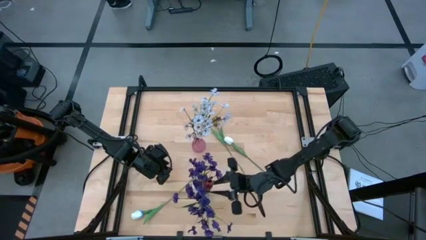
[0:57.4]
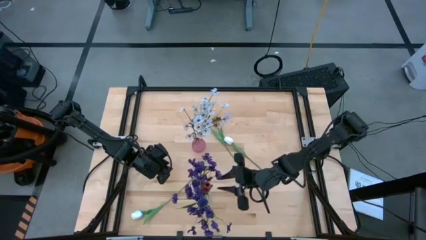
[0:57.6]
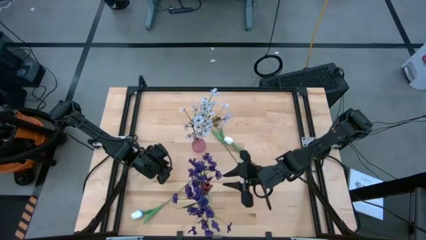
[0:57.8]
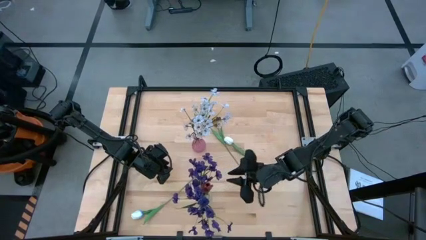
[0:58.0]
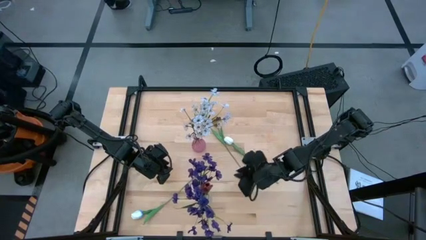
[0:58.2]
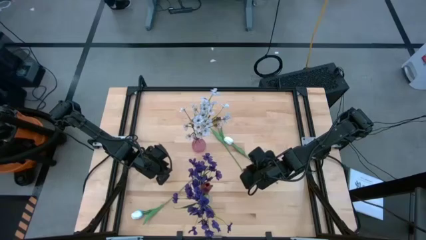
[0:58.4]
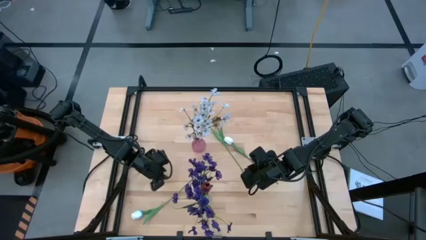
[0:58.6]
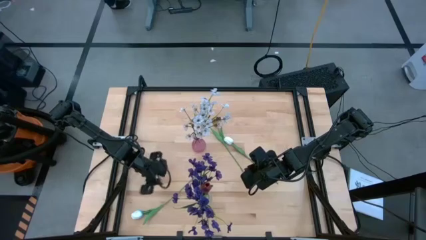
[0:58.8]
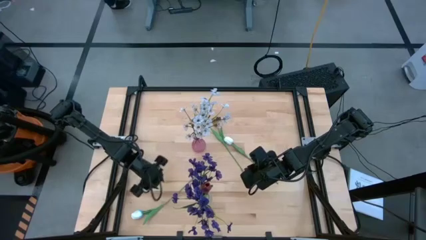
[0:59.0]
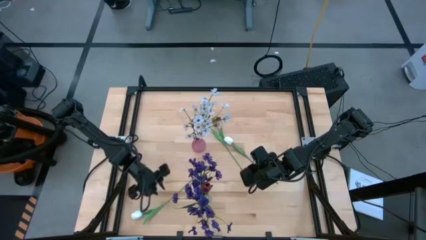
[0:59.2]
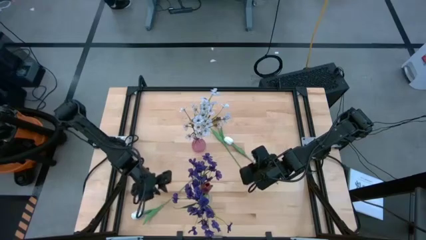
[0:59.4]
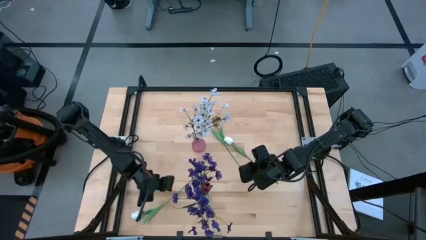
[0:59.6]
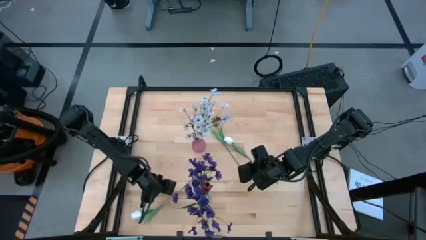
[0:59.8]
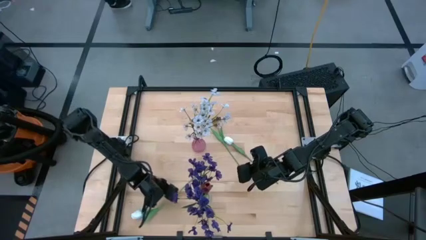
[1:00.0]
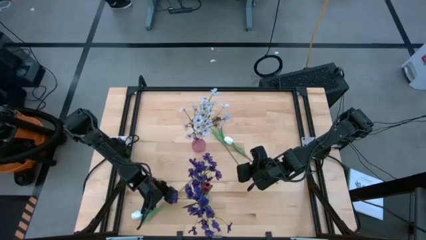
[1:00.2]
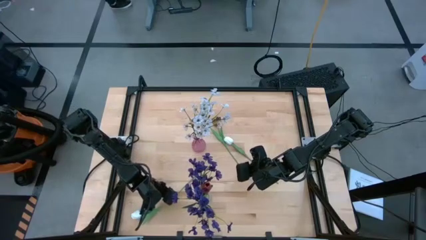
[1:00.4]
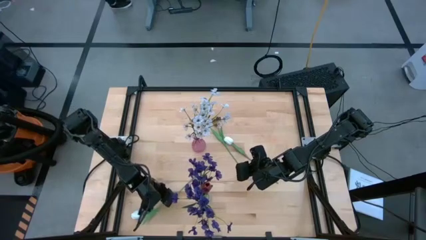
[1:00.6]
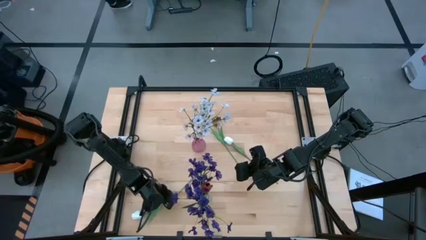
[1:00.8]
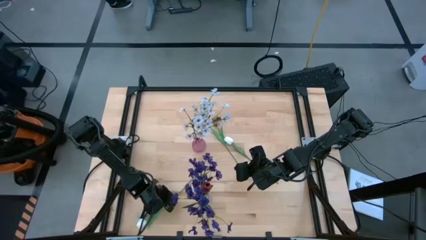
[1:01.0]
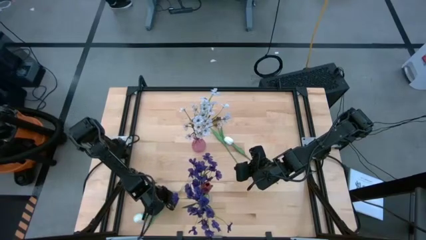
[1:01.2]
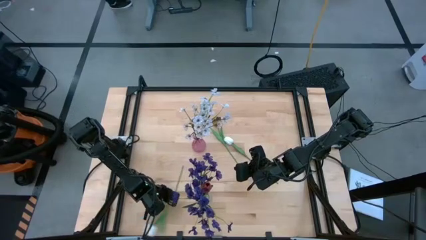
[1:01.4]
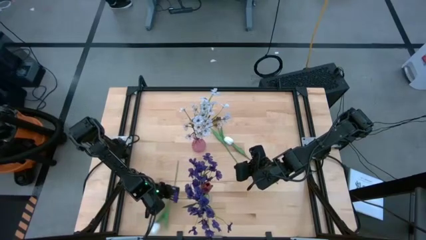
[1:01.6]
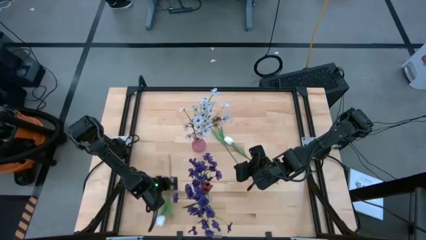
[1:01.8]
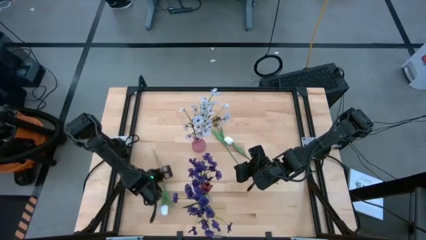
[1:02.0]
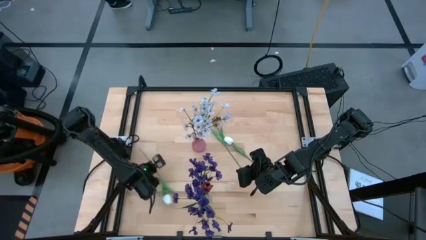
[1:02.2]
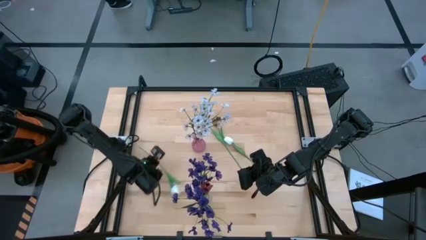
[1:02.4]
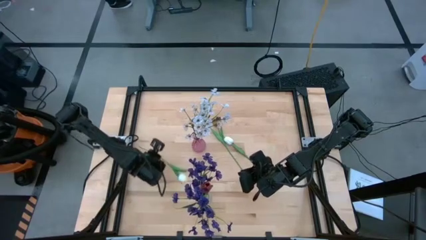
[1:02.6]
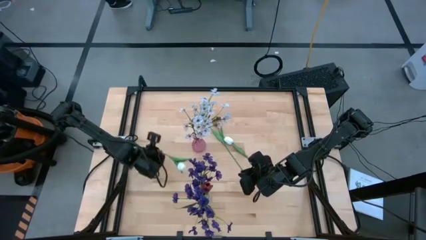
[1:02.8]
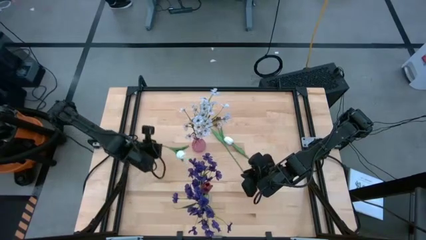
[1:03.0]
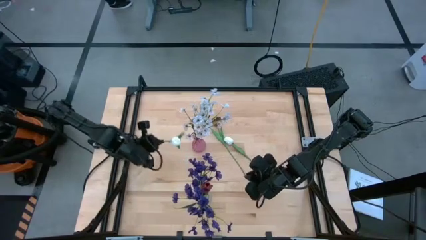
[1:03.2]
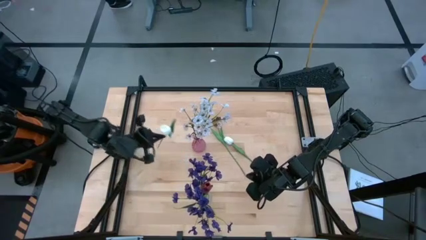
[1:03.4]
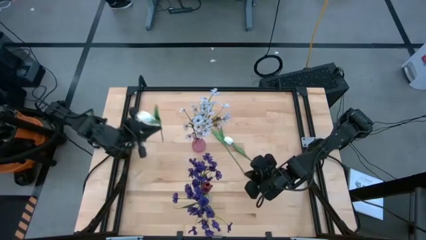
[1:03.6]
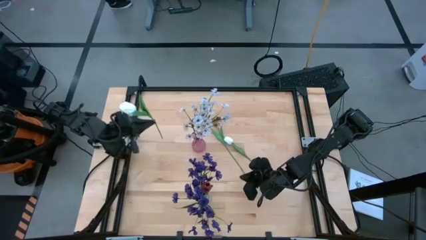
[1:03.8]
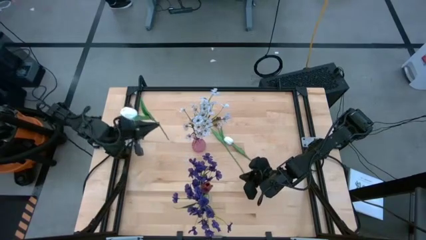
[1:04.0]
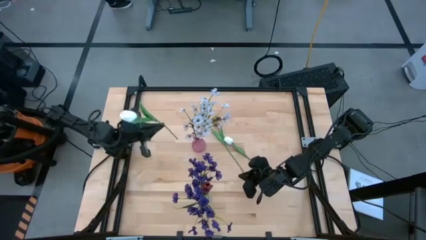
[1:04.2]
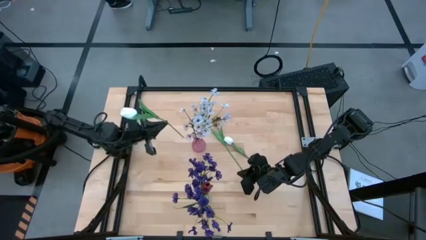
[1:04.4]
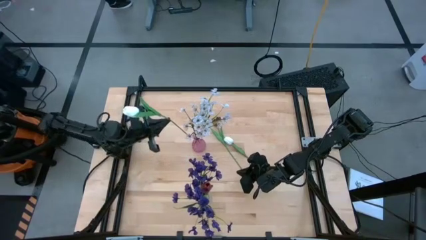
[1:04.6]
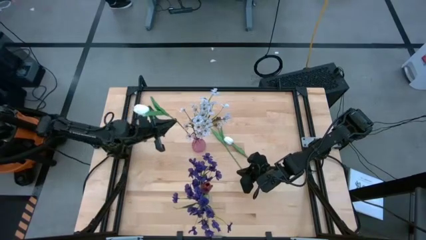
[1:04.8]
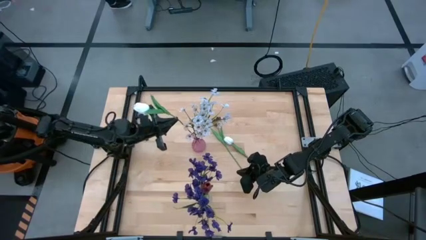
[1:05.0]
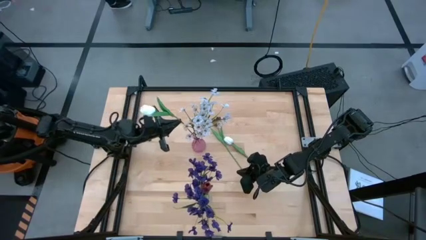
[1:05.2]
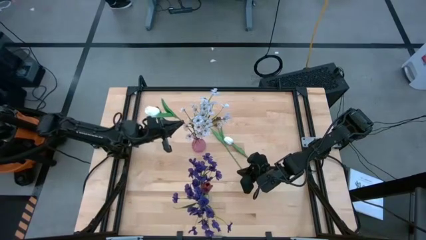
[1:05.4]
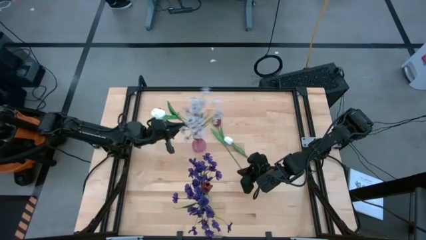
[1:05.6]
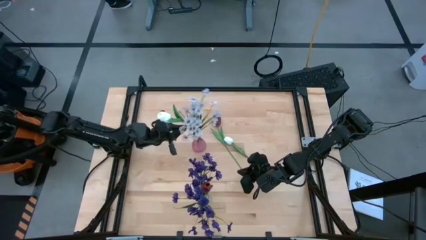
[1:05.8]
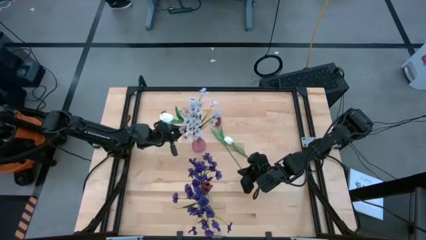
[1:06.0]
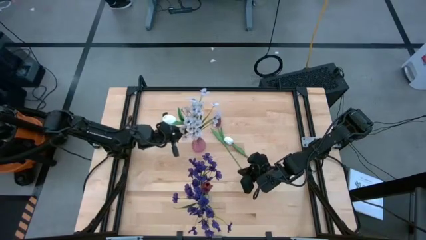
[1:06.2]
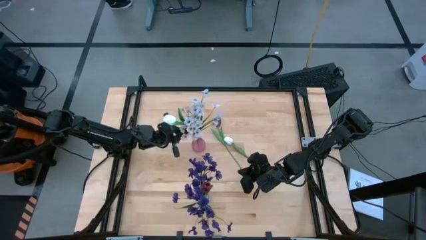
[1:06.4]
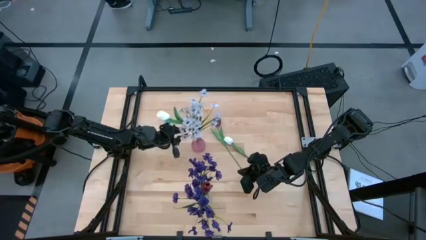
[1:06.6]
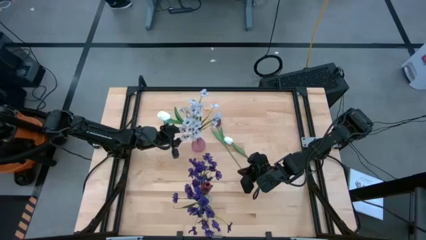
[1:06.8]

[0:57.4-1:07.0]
Task: Sort flowers into vase by color
Put the bottom white flower into the pink vase

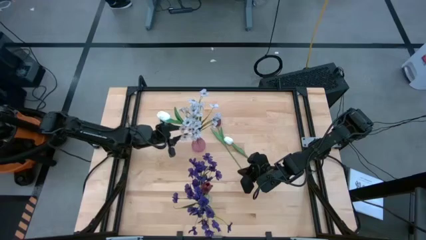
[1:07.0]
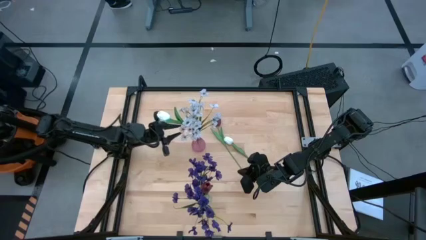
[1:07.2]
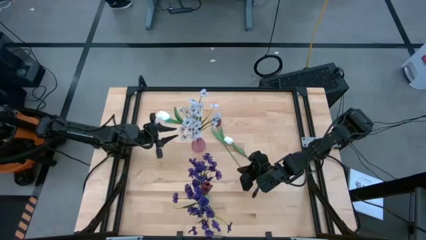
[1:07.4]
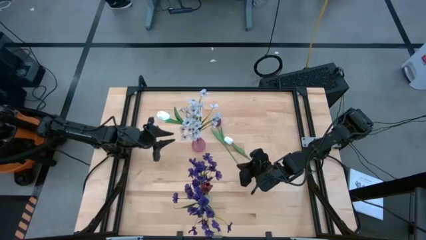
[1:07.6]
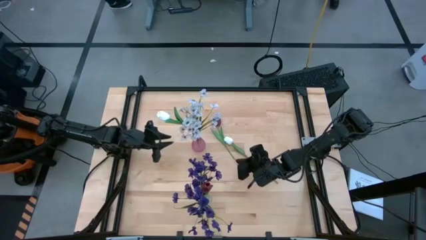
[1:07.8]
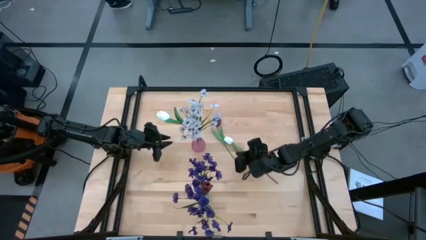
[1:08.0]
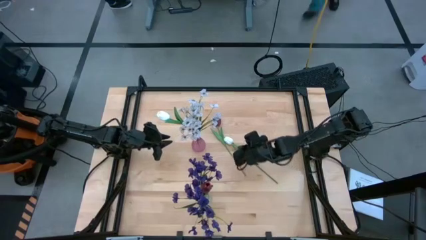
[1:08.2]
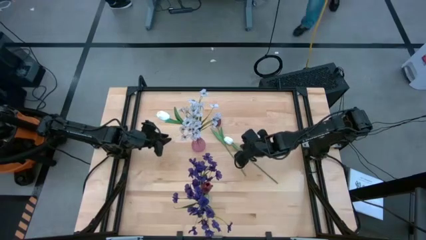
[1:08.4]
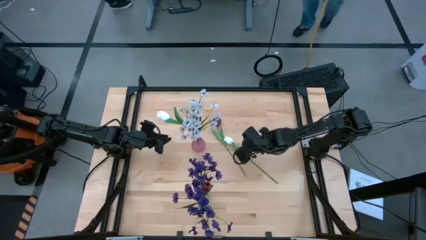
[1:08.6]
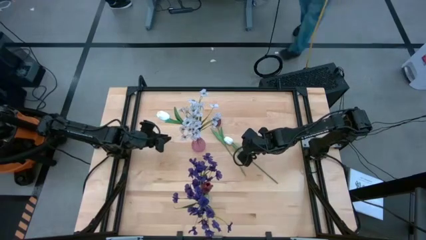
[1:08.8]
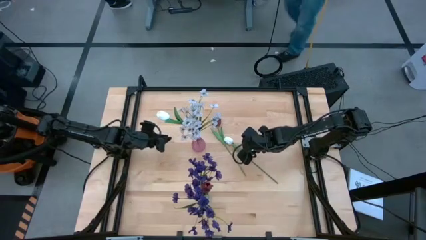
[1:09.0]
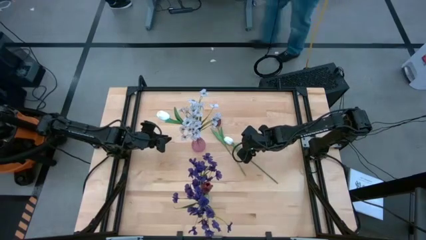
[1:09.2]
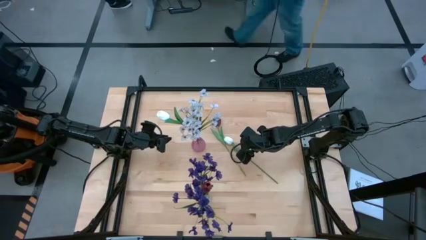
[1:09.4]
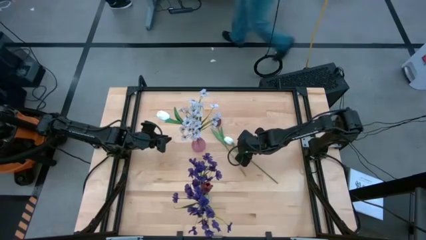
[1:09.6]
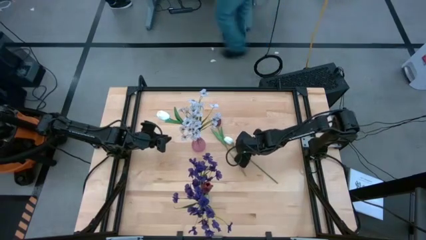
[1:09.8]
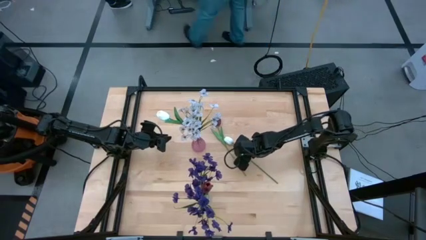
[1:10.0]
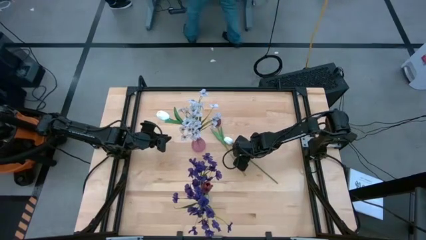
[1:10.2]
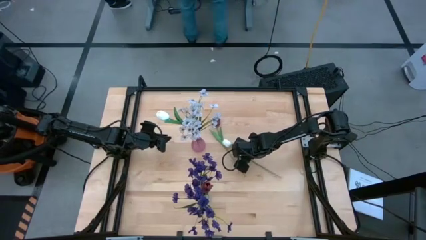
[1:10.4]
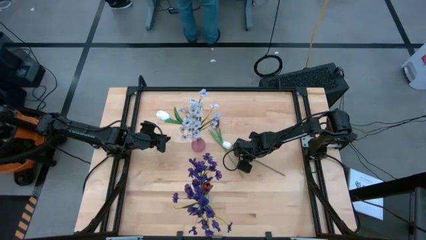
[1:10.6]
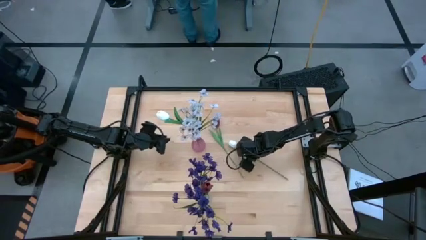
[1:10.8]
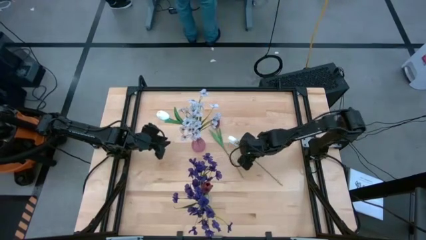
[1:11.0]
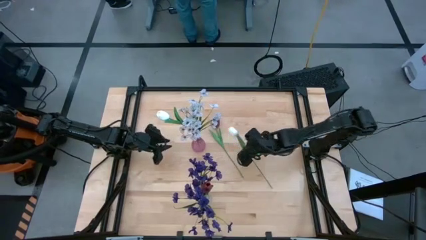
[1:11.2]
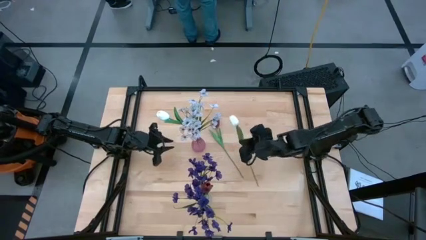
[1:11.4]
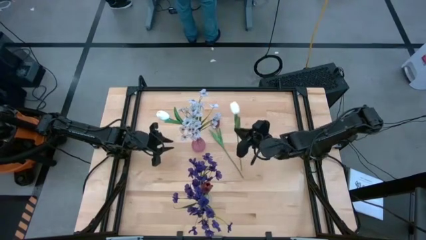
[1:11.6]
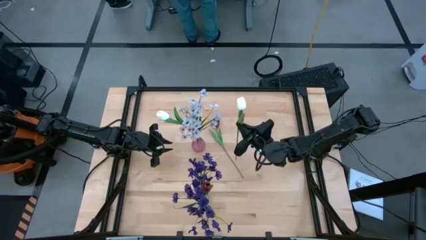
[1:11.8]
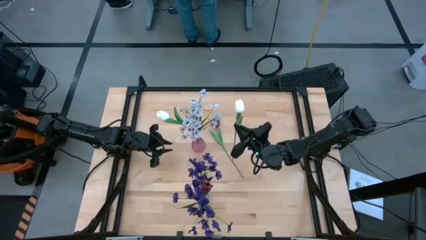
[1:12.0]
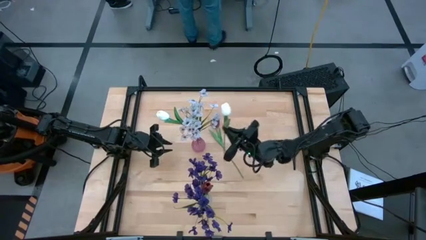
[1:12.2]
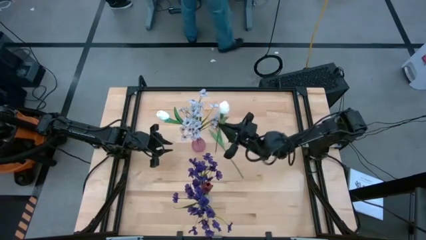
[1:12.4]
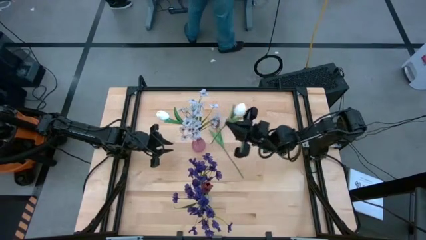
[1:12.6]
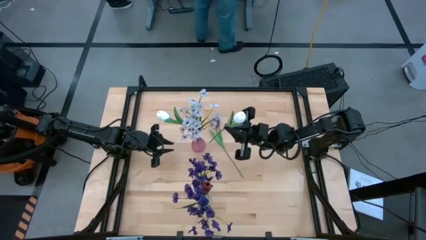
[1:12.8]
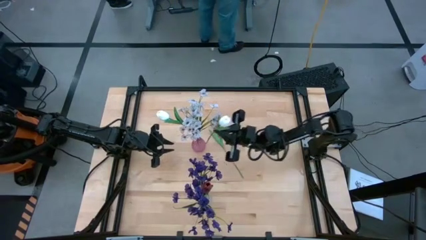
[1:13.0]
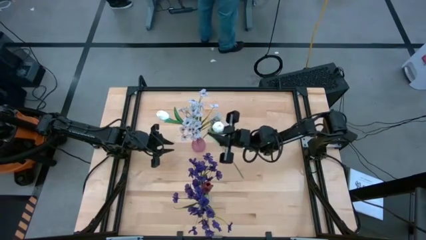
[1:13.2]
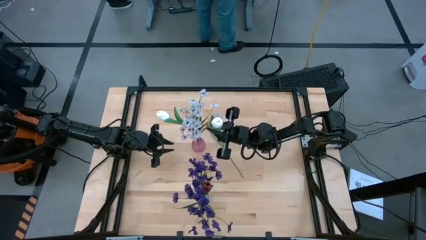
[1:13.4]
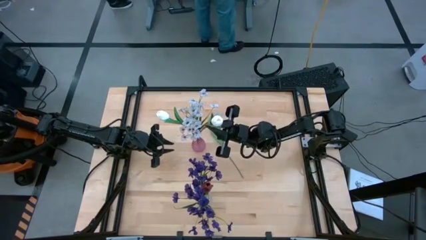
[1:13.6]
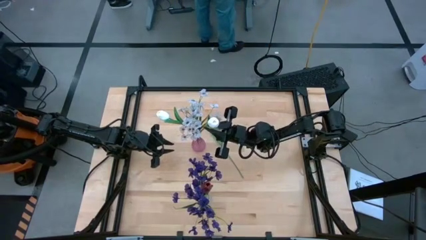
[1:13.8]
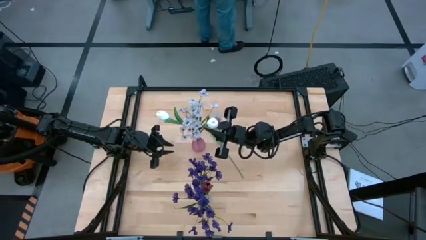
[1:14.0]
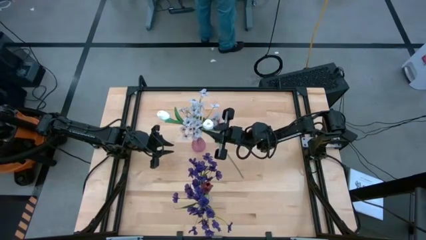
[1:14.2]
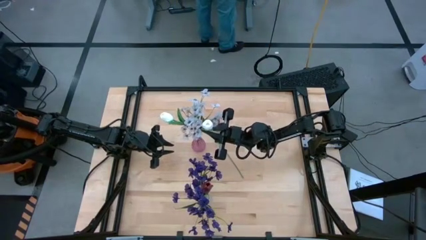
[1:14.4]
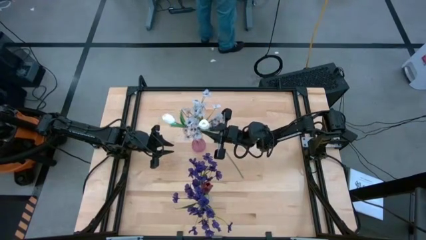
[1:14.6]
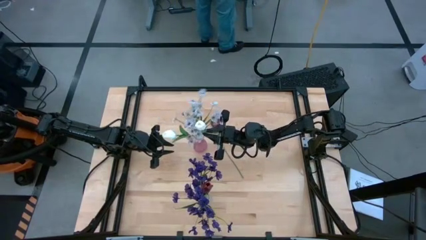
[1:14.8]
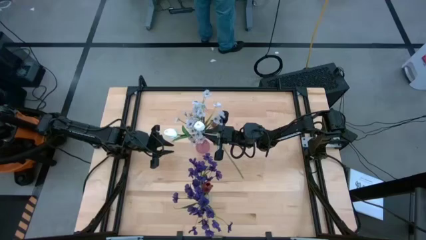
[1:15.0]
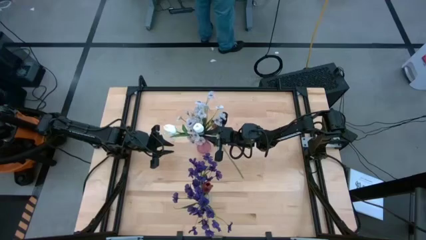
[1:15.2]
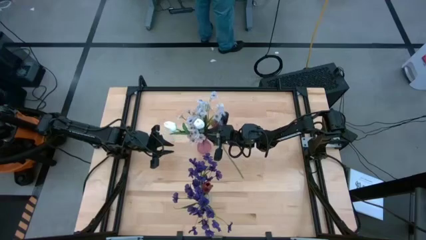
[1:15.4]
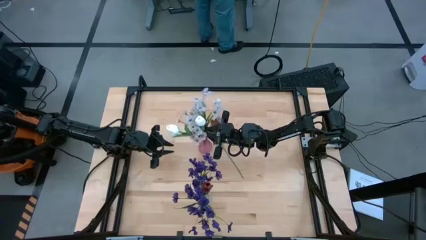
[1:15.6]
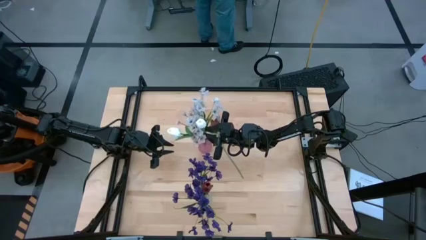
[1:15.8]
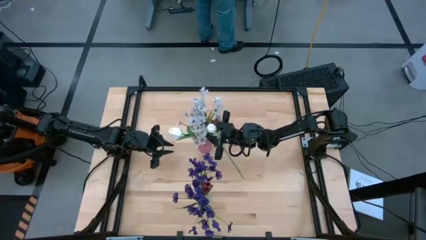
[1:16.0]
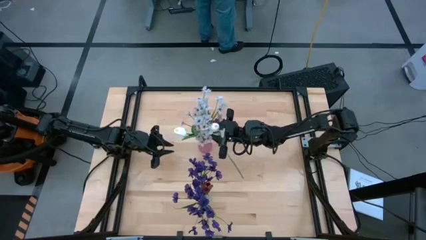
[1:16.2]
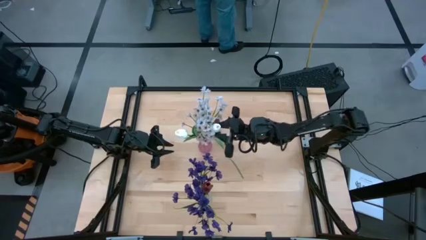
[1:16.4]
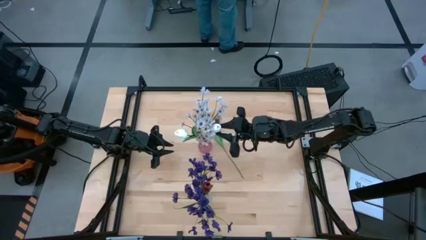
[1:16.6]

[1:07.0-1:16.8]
Put the white flower into the pink vase
